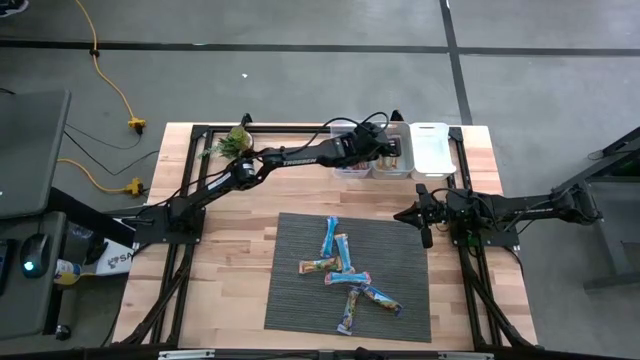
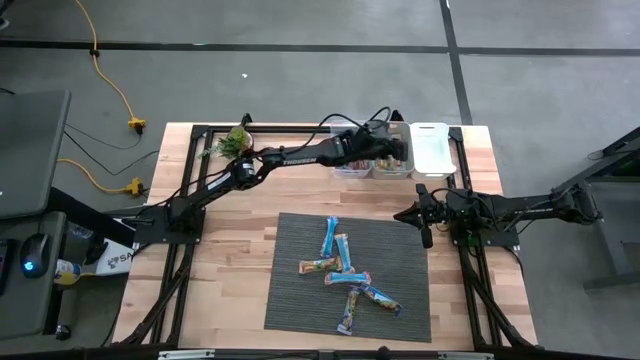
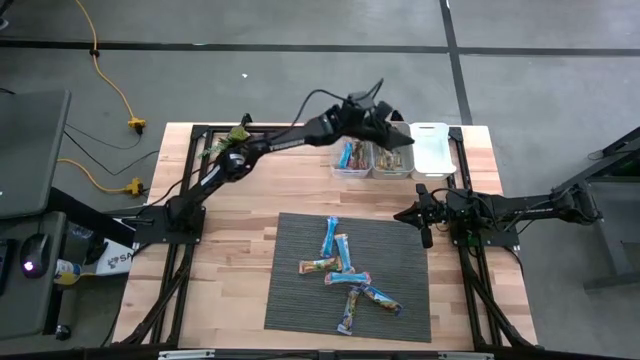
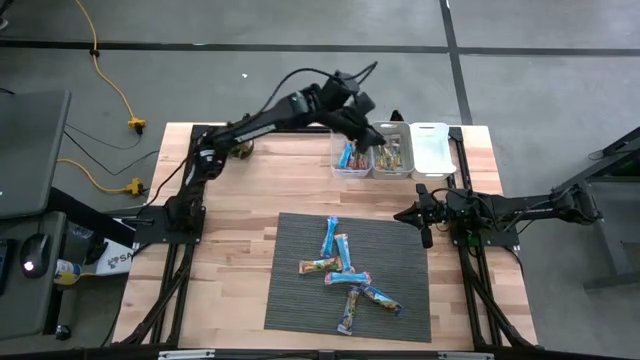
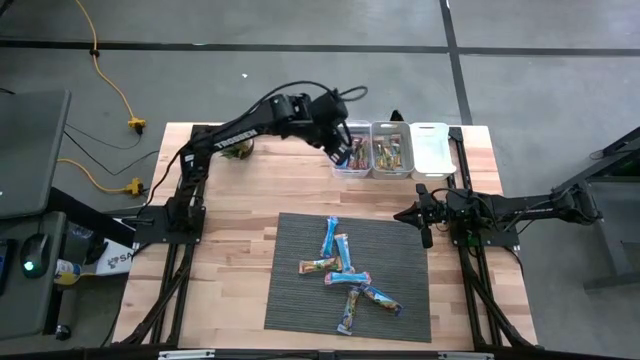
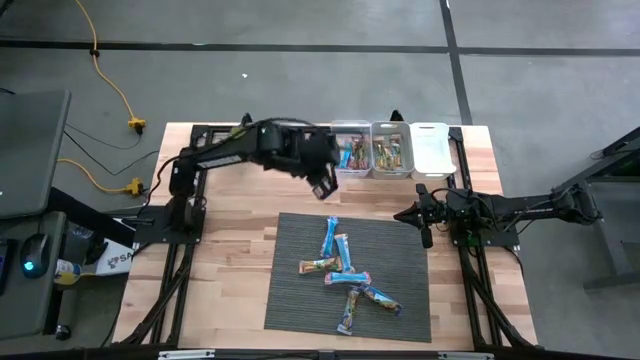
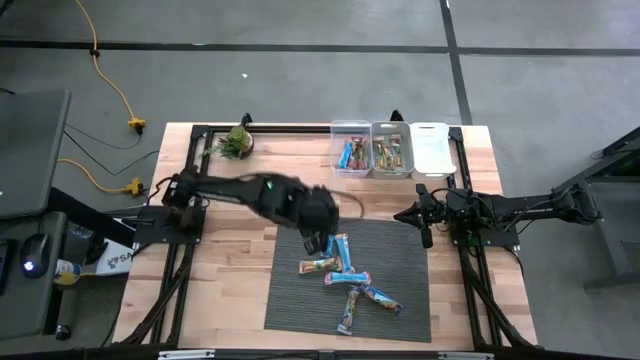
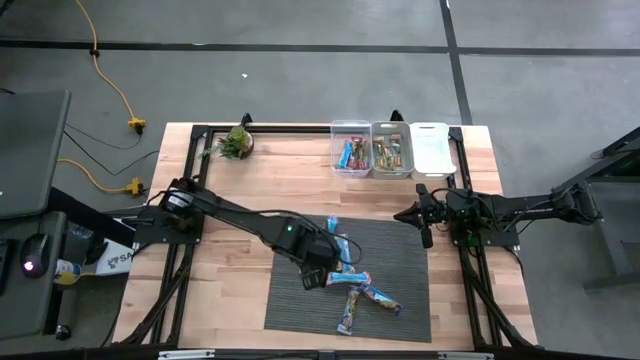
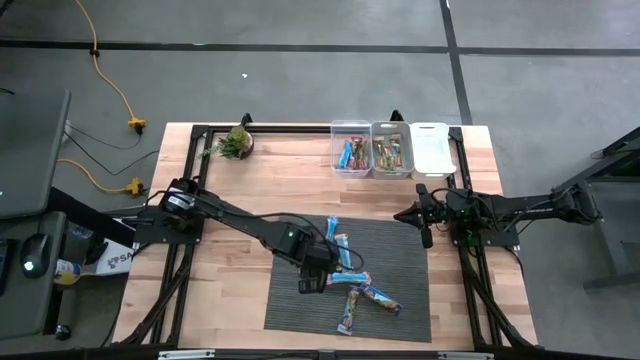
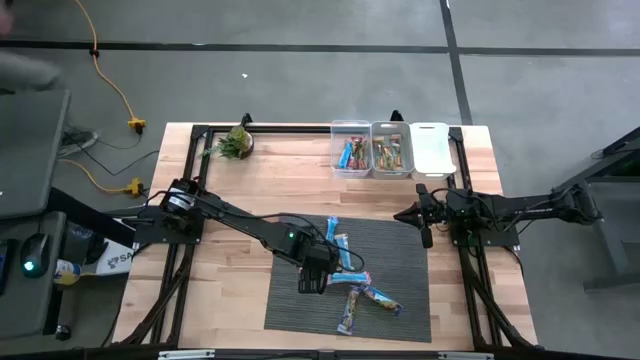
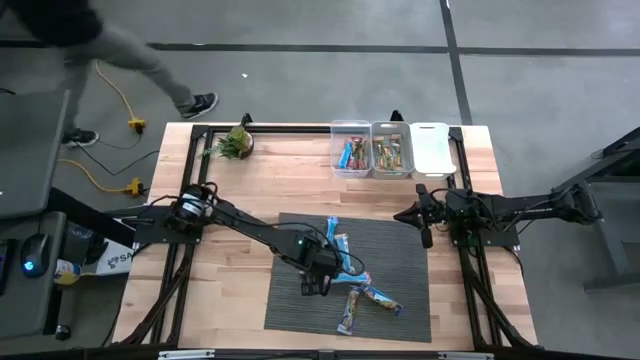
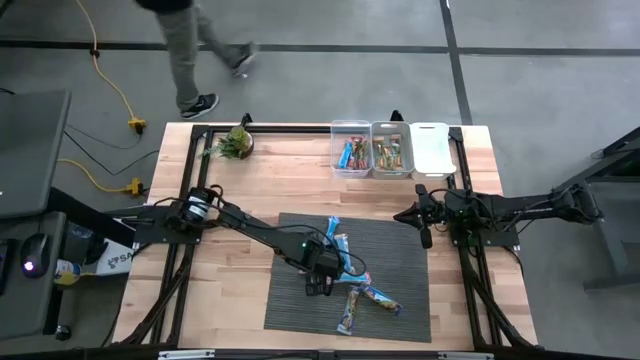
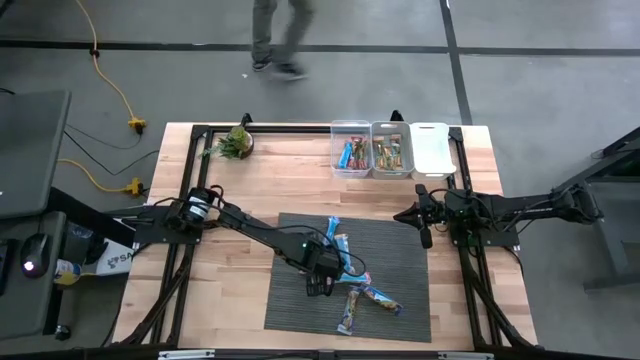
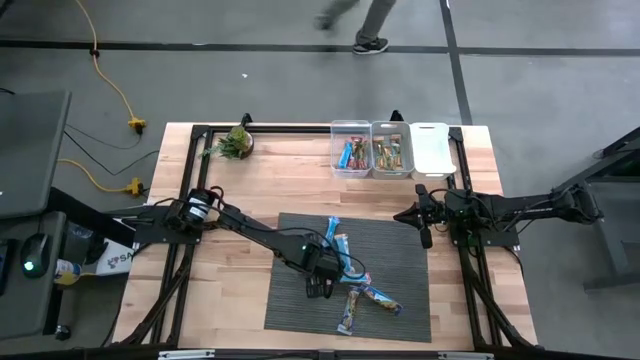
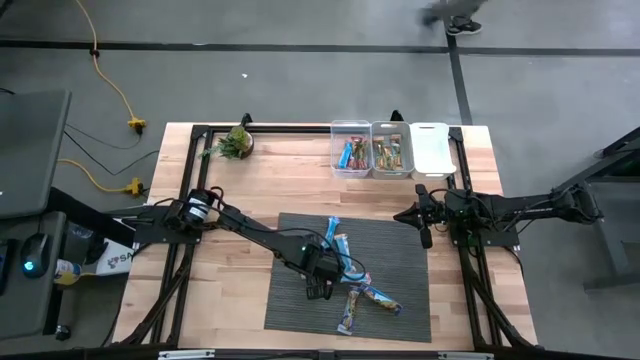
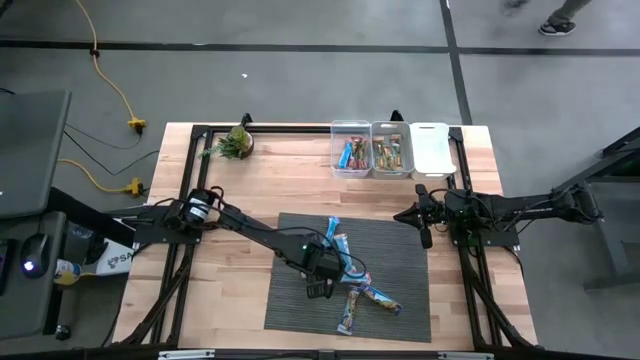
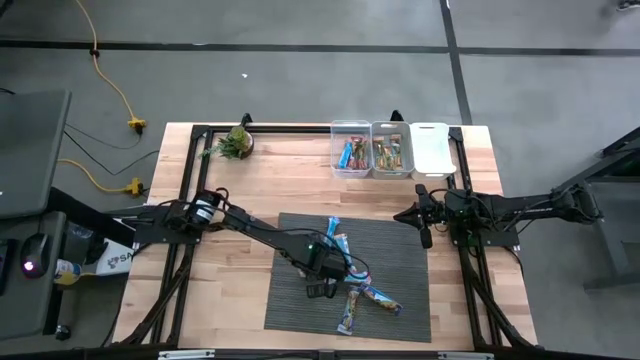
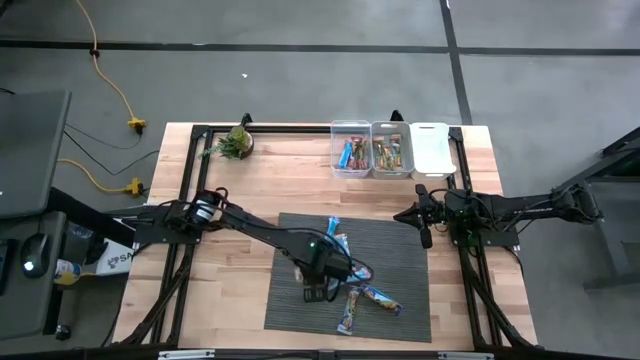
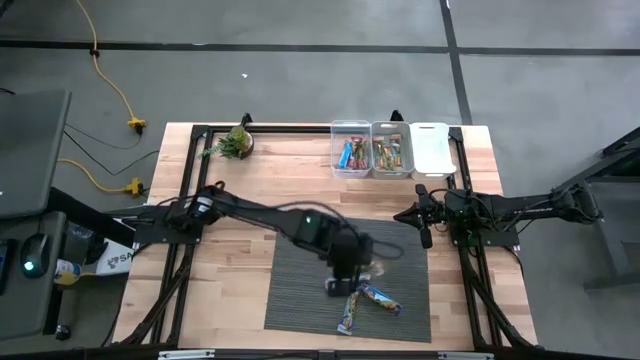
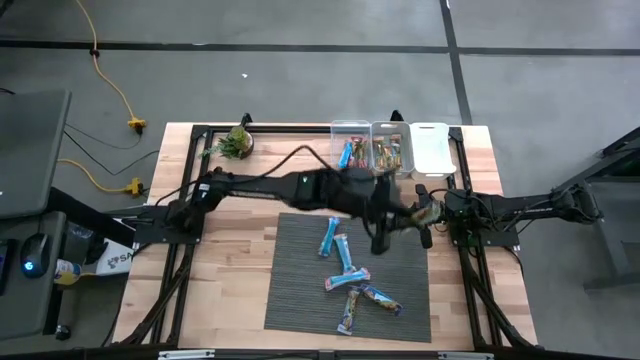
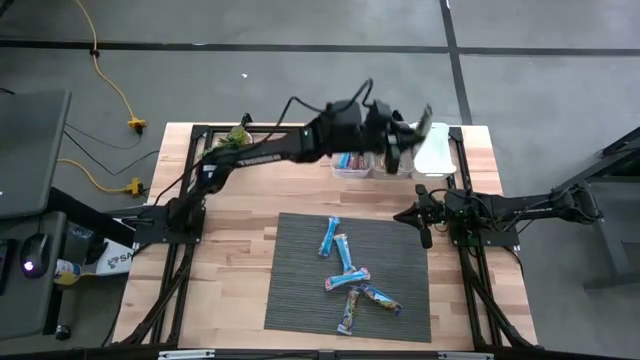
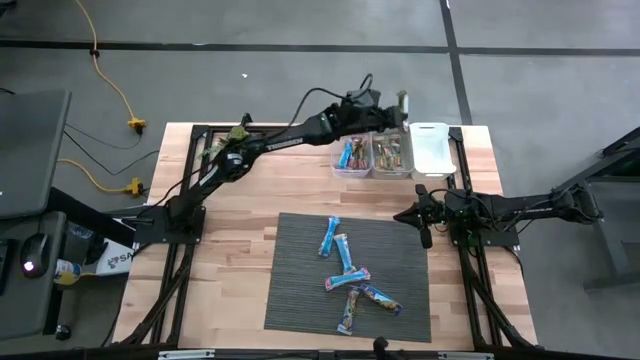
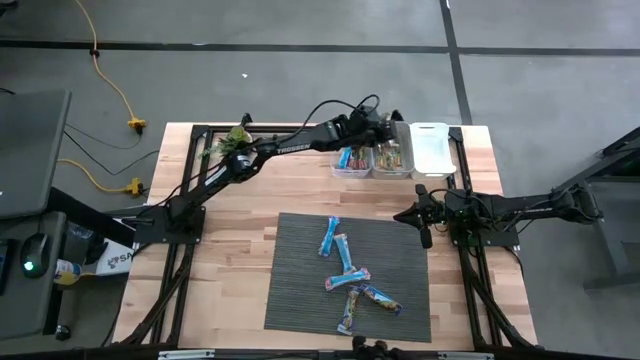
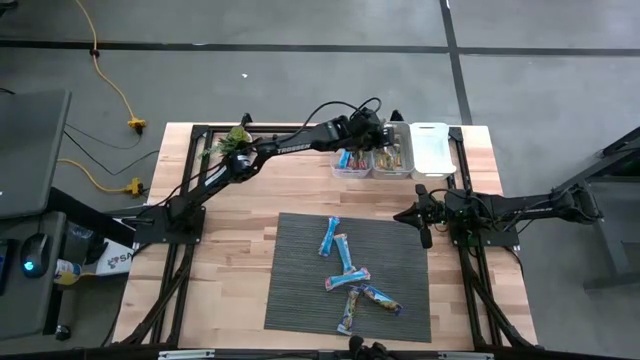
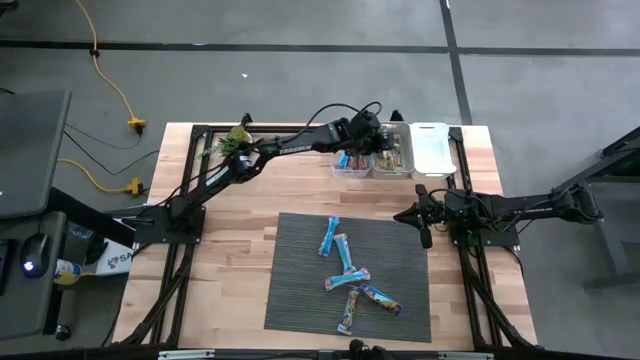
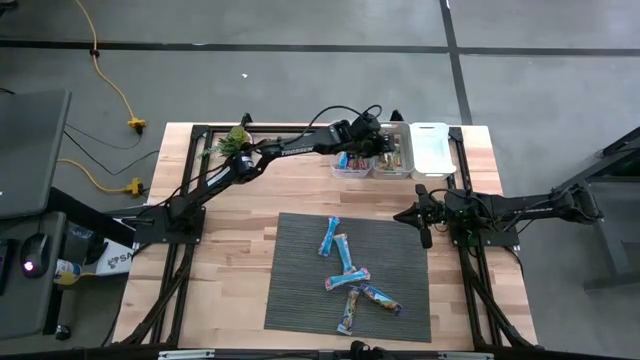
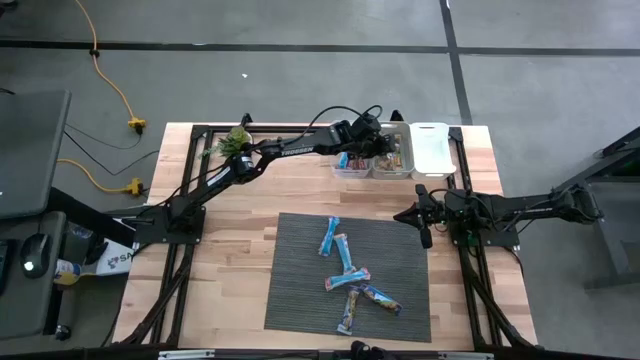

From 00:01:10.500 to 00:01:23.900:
Task: Pick and place Granola Bars by type
Put the orange granola bar into the gray bin

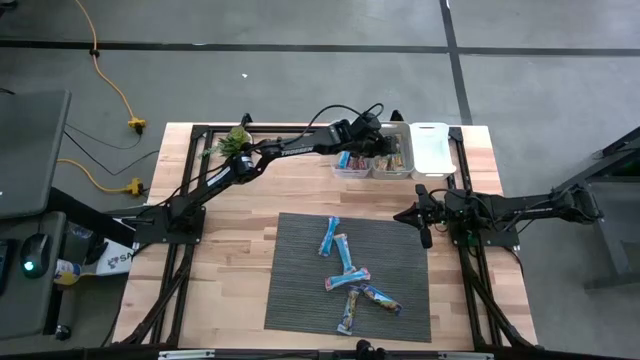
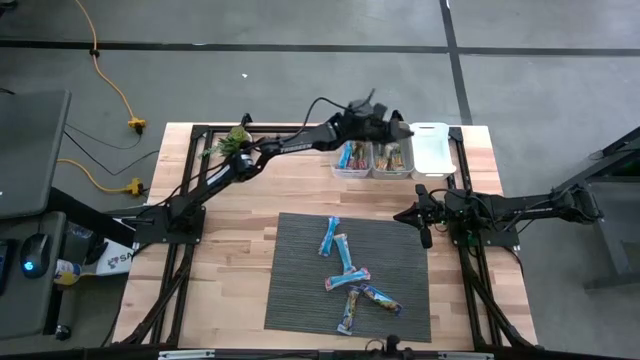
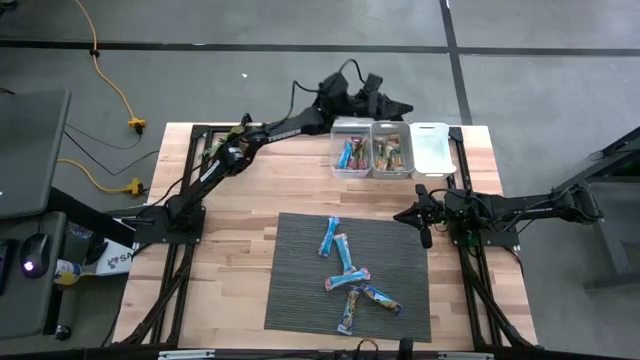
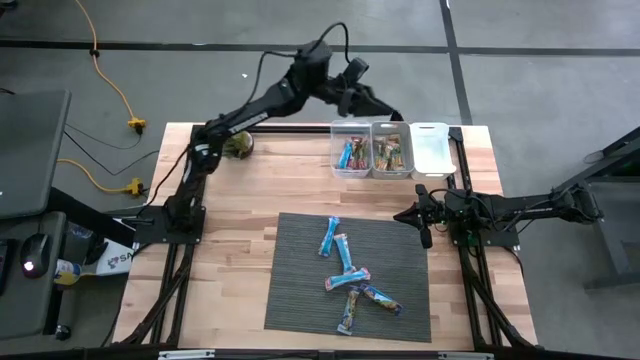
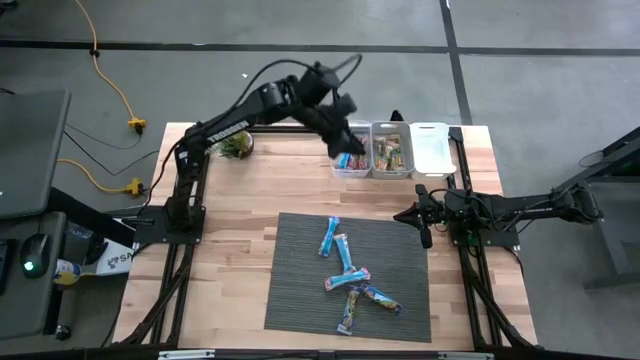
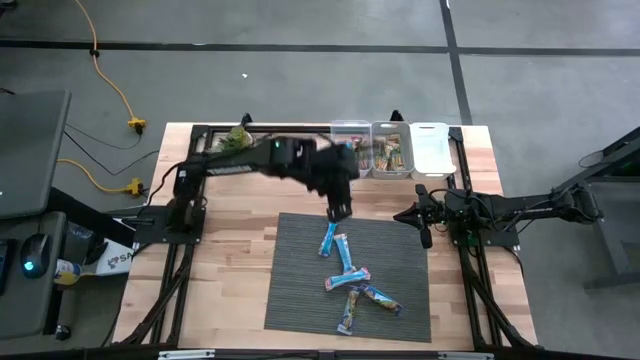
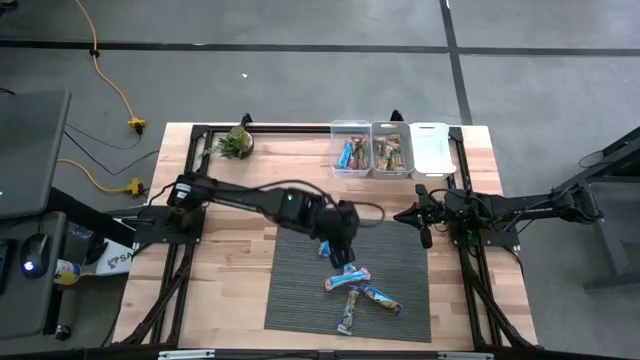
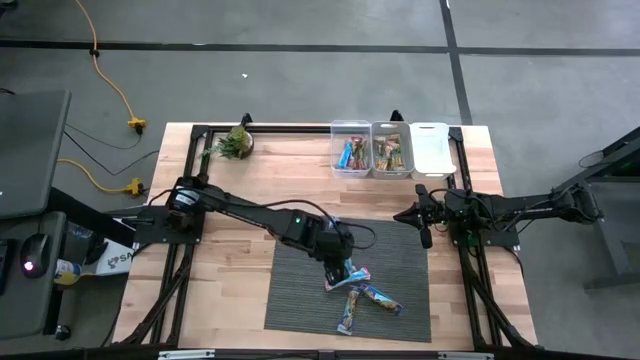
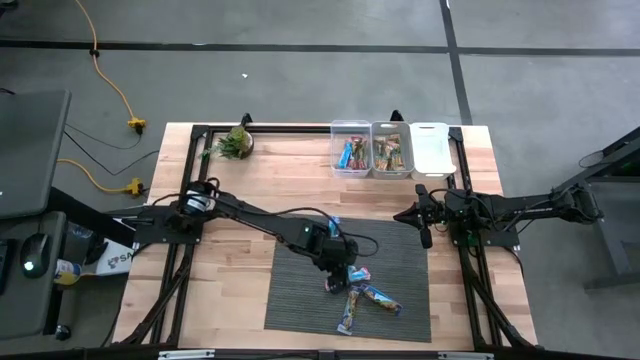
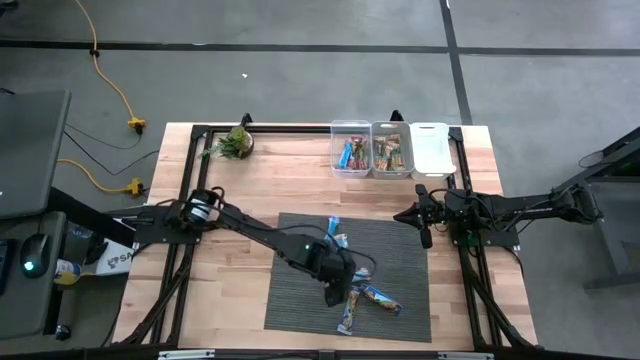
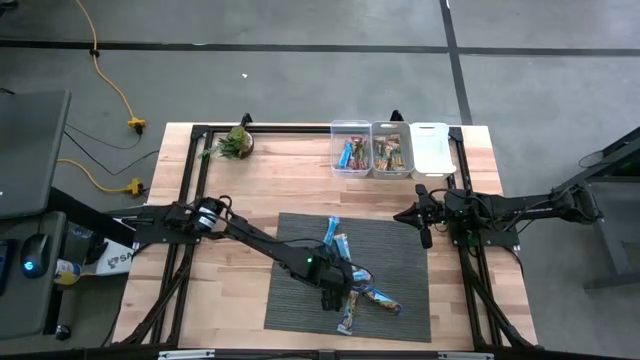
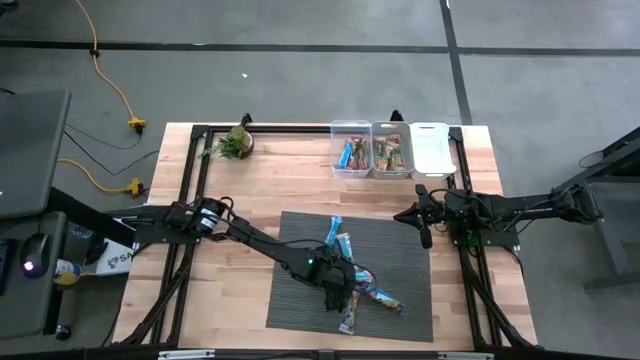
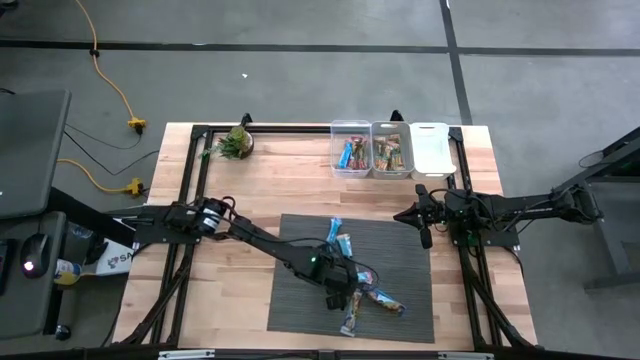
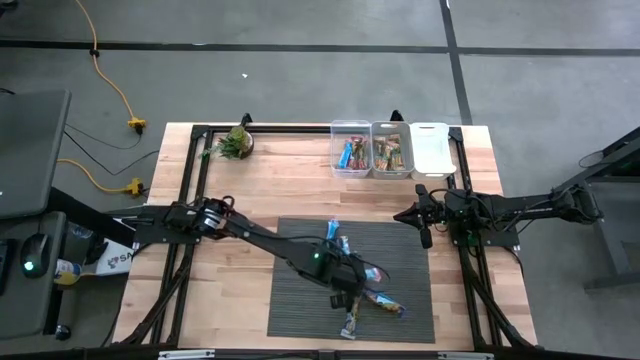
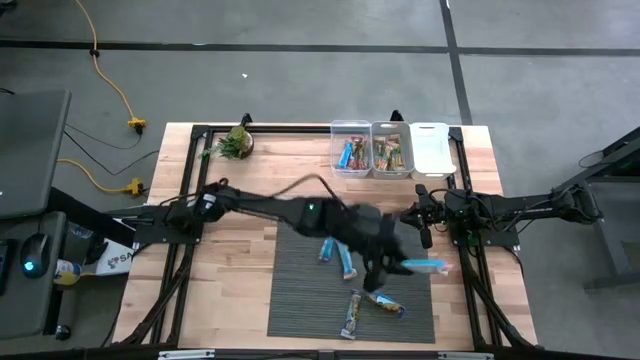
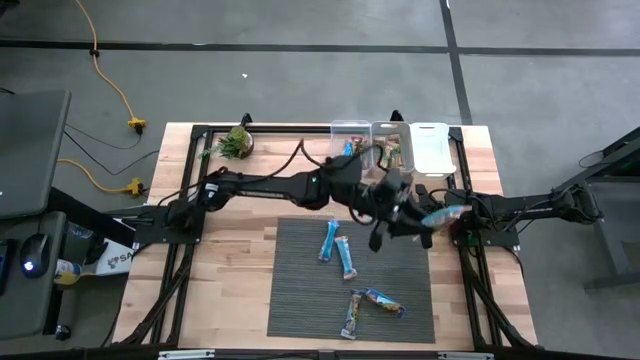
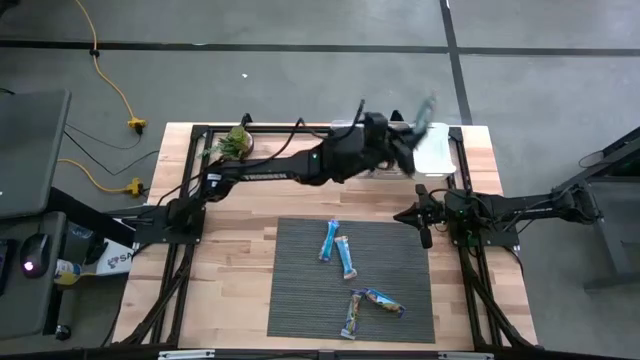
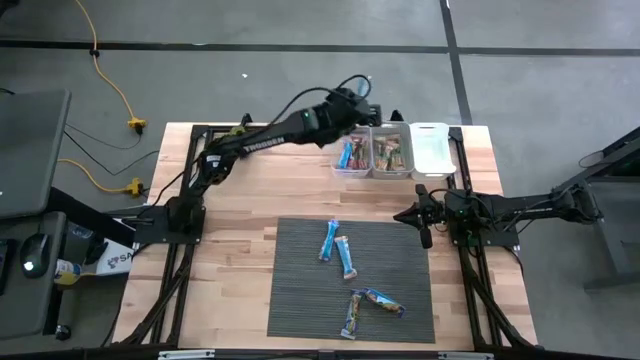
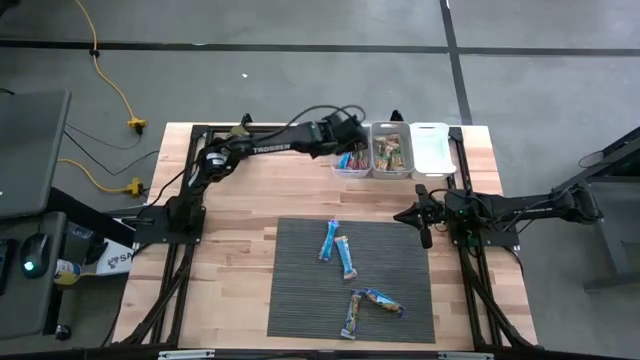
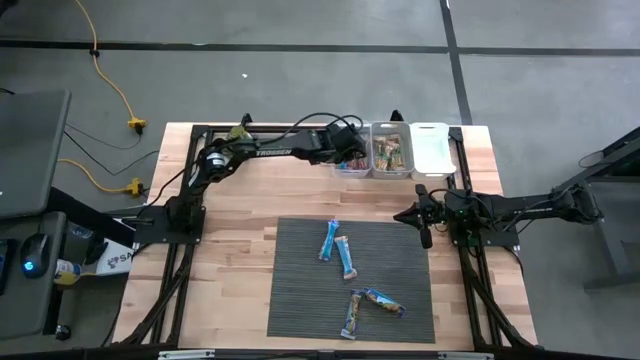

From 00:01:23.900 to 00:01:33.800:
Put the red granola bar into the transparent bin
